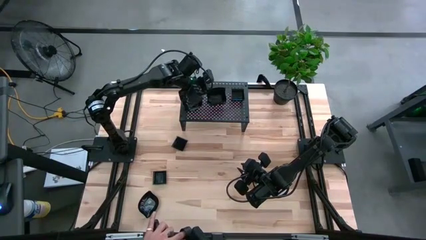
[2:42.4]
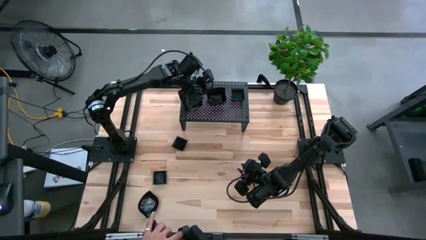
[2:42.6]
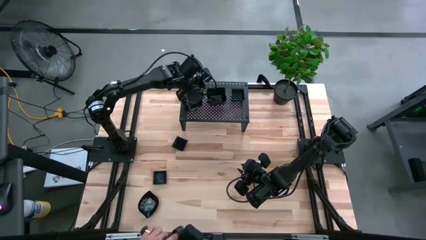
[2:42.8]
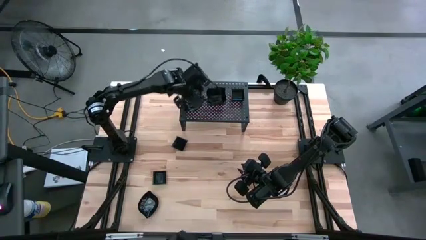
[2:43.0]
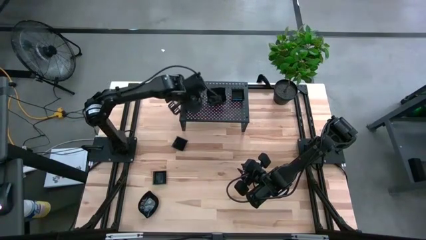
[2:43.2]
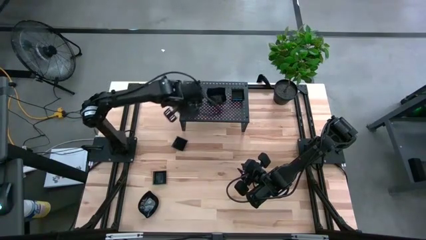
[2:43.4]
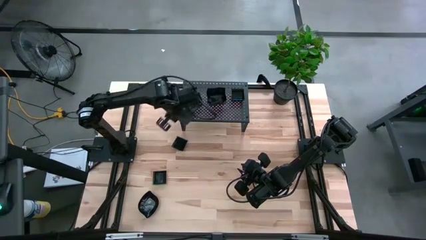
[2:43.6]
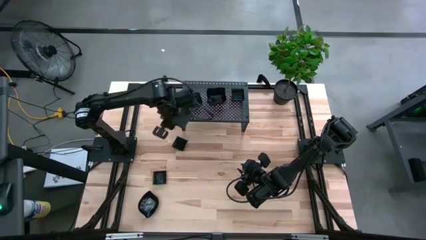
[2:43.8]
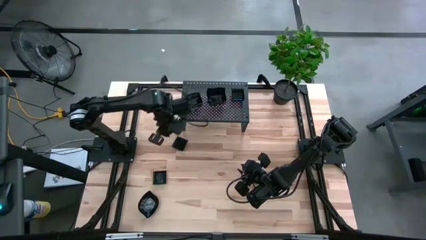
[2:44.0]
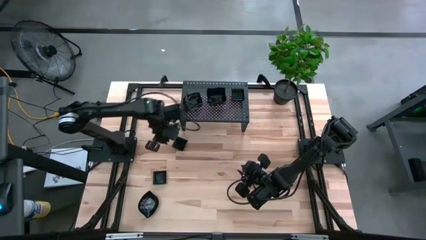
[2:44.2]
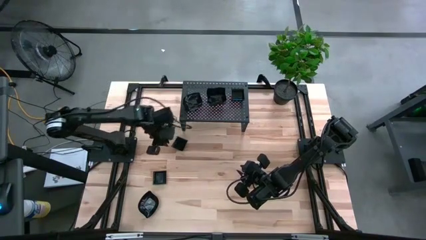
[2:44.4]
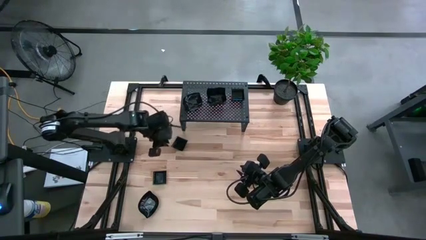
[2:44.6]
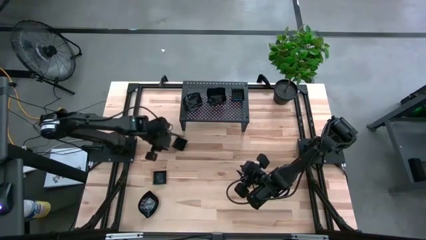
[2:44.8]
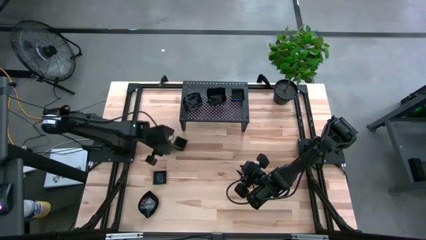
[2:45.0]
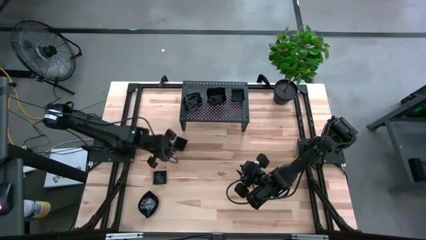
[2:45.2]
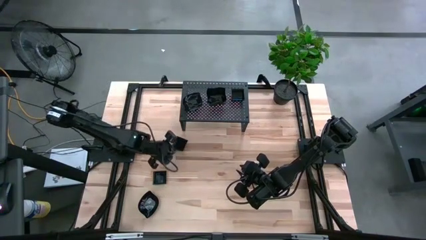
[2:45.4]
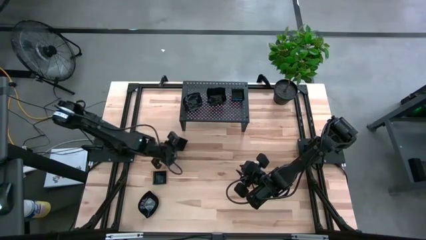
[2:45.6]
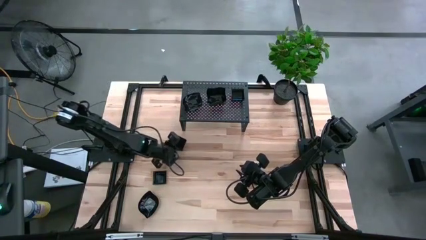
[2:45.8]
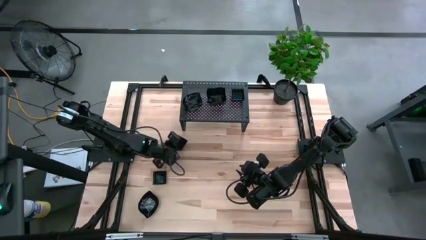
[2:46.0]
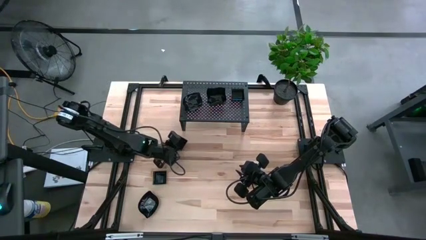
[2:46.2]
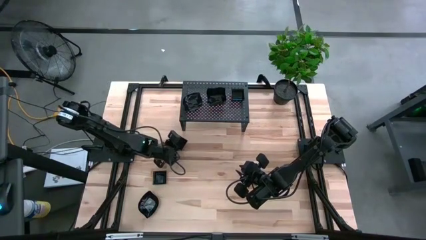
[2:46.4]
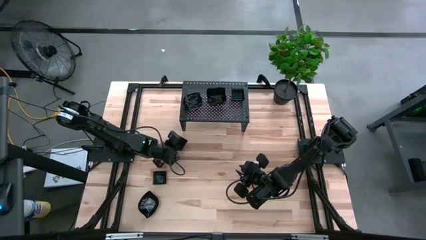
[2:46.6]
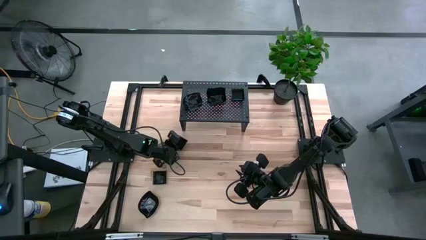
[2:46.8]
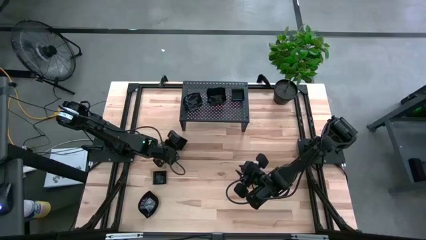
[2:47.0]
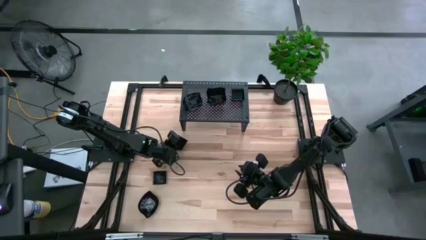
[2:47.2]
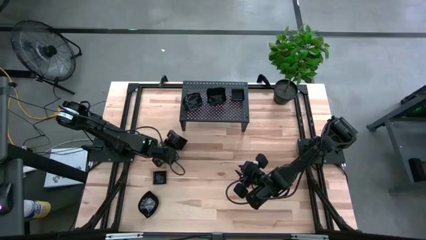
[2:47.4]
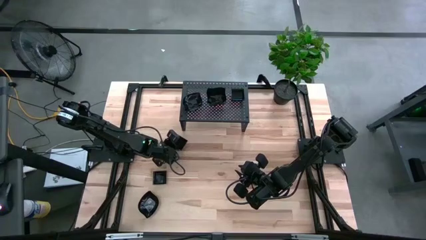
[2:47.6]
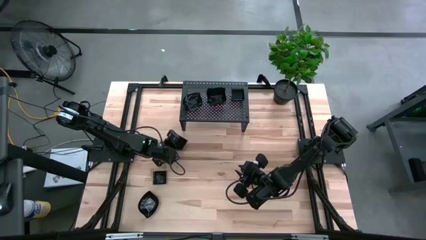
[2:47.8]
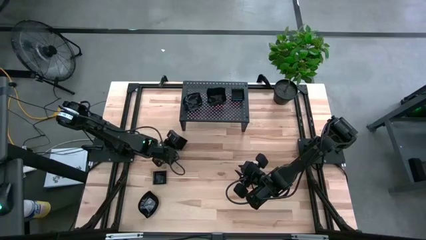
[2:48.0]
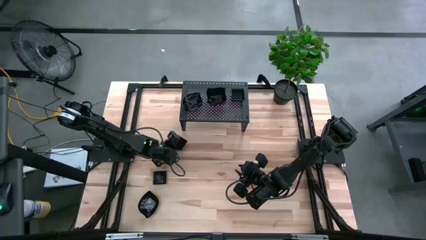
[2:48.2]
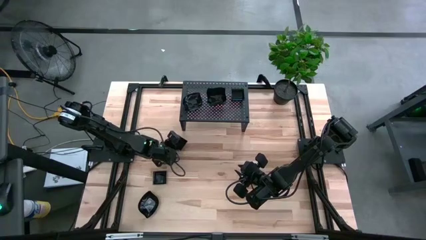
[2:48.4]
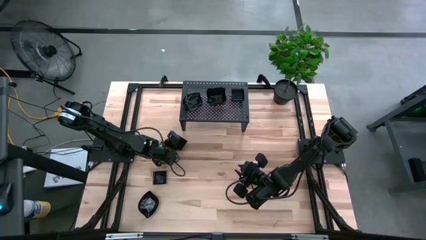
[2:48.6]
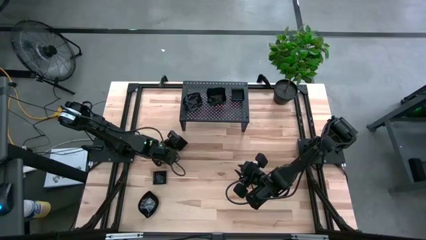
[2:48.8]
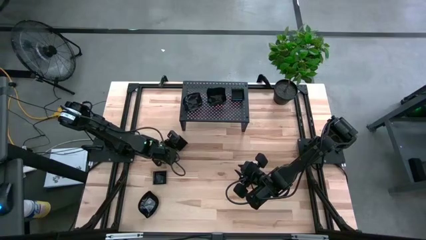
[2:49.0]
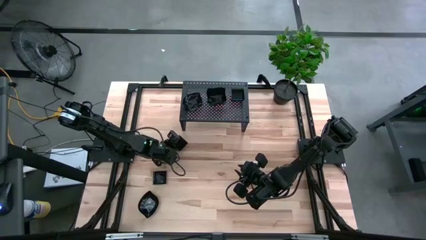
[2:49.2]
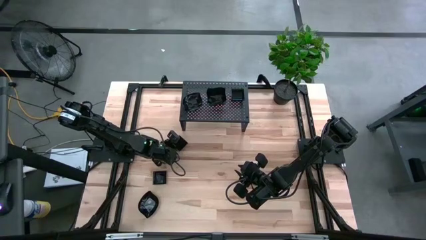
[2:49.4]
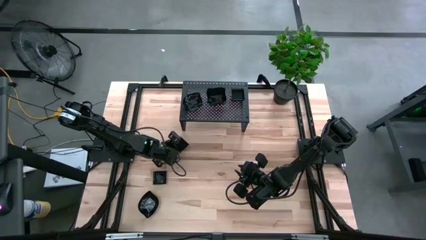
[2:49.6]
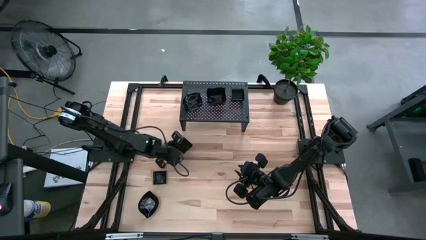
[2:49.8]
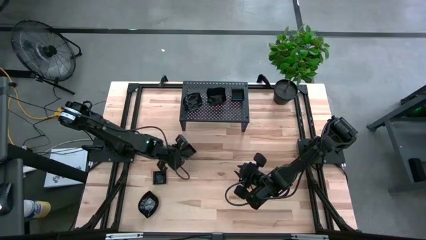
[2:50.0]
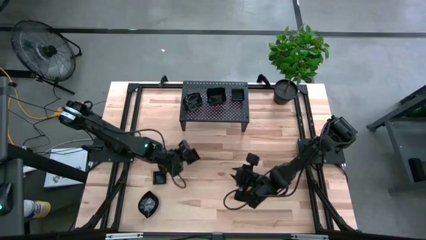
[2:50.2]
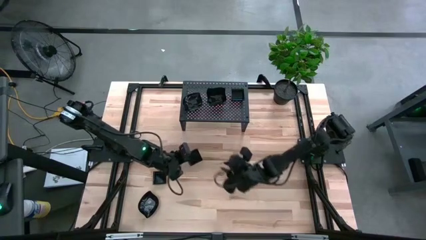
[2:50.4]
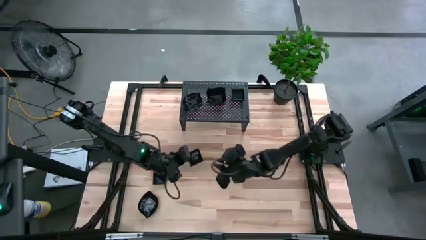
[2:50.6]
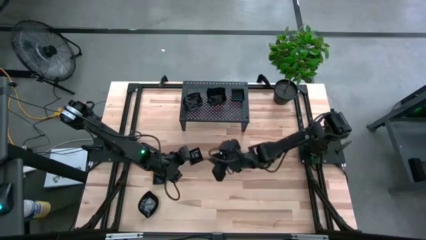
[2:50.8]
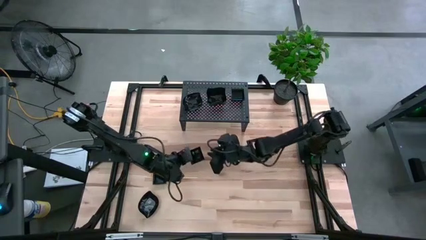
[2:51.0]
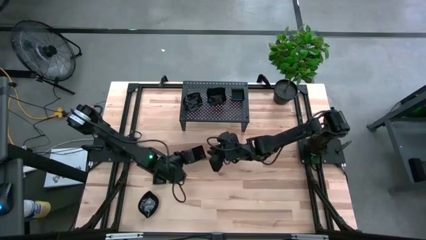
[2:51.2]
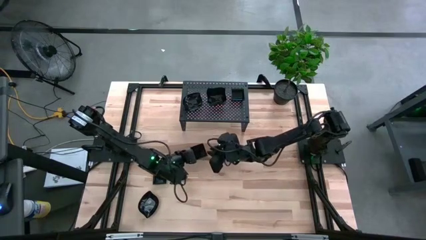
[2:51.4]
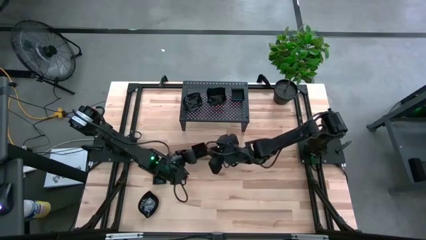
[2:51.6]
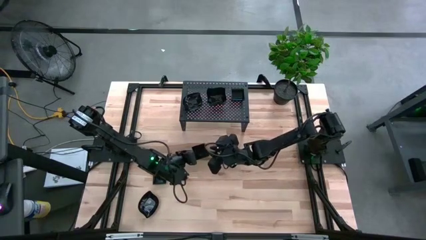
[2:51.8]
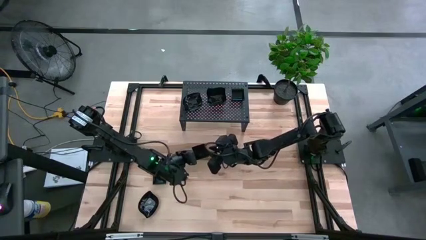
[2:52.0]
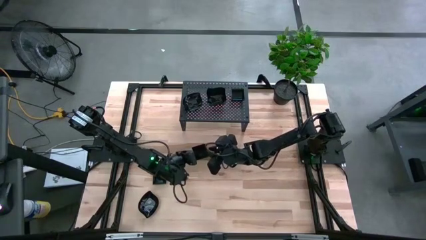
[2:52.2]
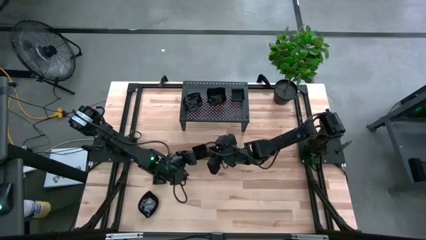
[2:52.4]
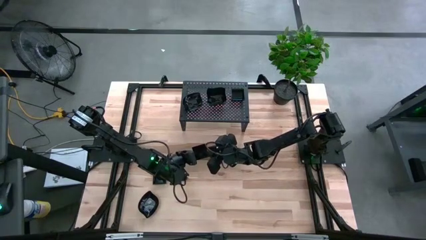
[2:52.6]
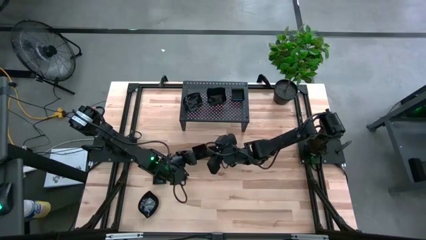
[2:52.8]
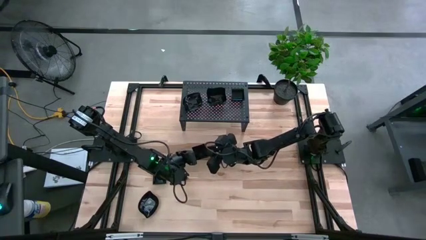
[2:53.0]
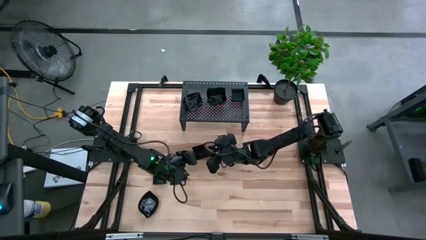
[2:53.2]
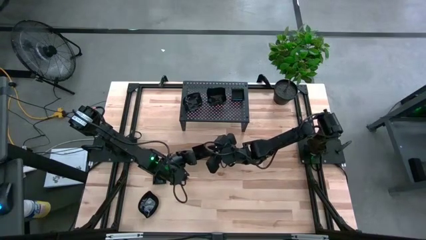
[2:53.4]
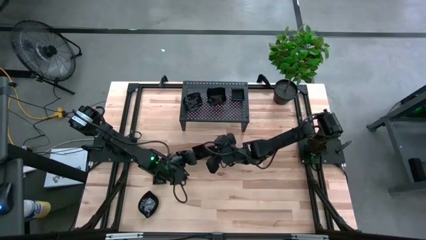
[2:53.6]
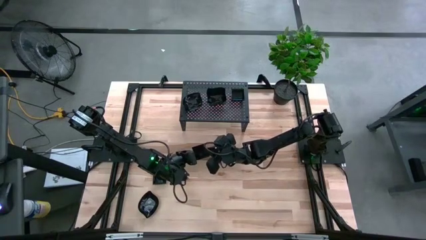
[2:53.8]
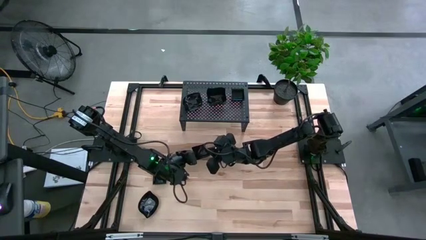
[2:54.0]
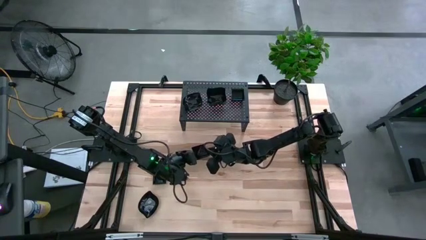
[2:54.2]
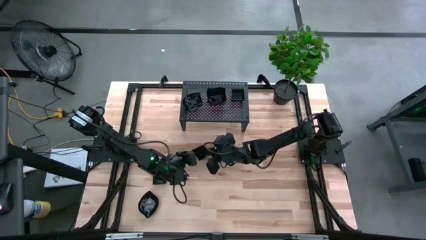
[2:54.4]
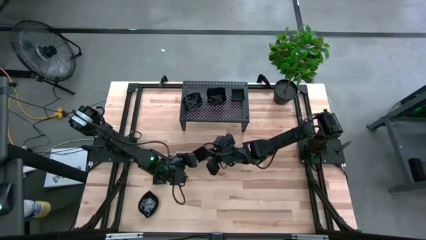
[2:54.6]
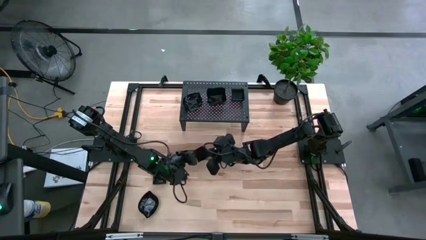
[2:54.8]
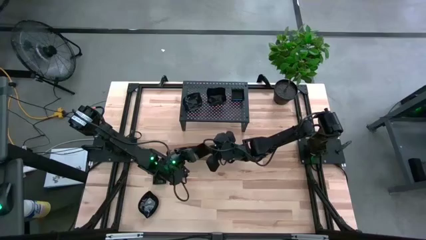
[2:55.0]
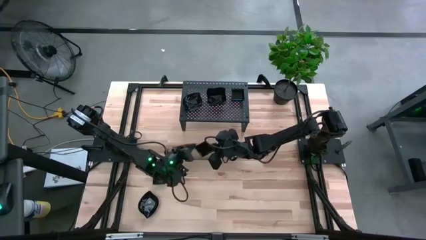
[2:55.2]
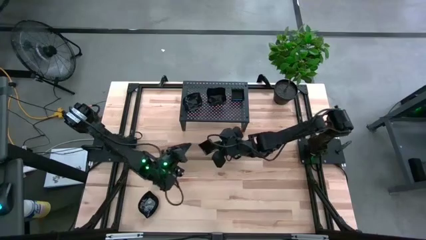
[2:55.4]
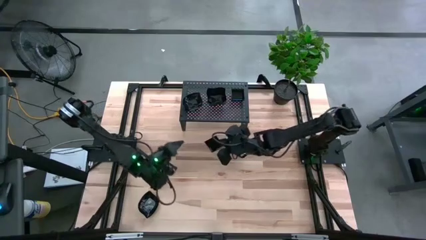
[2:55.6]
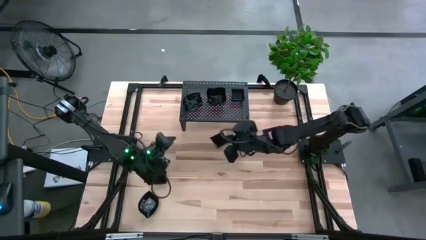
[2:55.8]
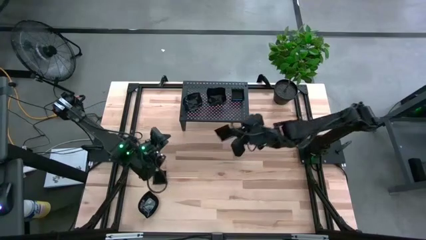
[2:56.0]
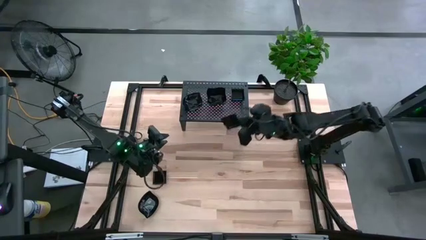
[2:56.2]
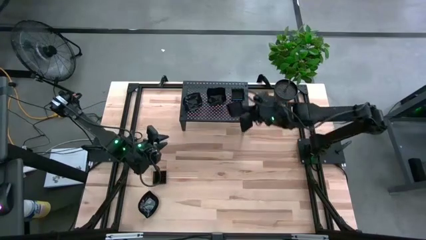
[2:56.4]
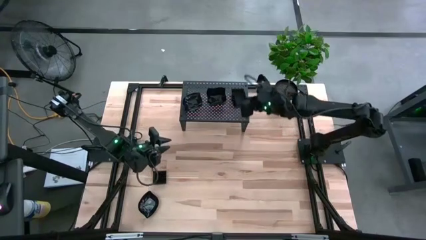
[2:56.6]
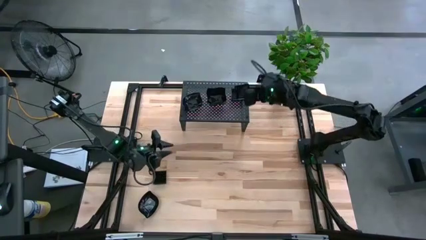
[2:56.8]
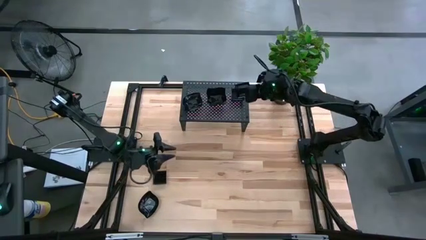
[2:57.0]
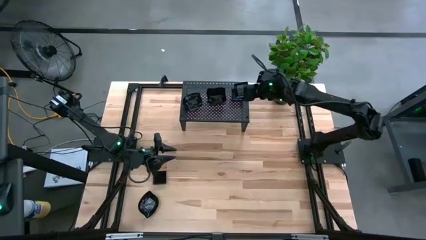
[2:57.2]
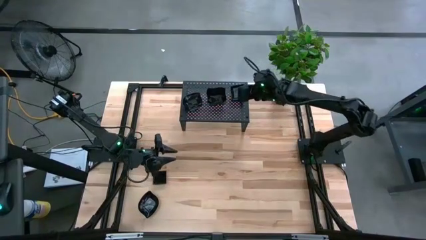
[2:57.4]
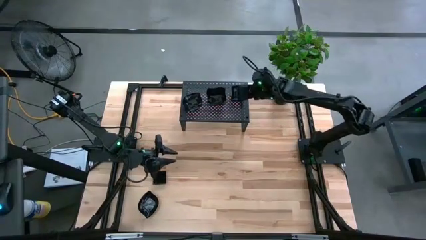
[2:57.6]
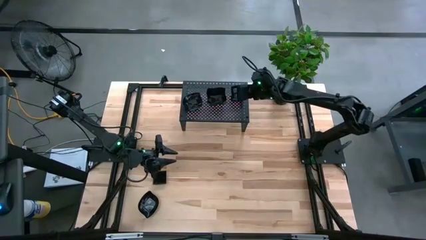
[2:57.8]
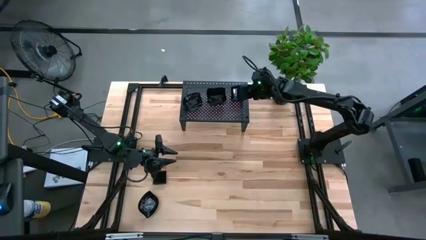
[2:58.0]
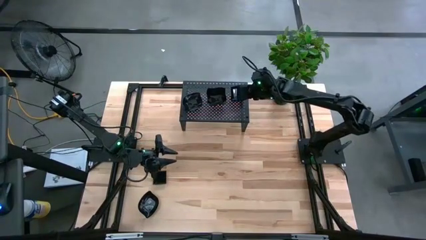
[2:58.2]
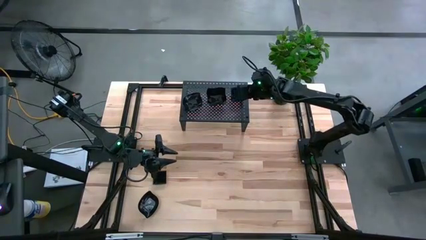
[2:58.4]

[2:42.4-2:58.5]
Task: Pick & Place Mini shaped plates
Stack the square plate on top of the square plate on the shelf
